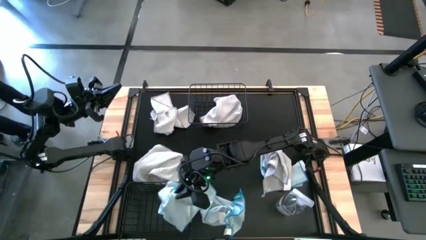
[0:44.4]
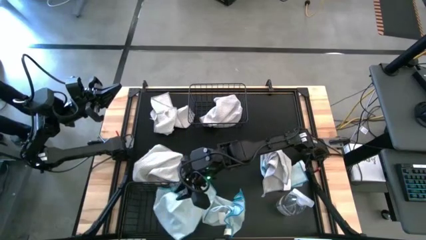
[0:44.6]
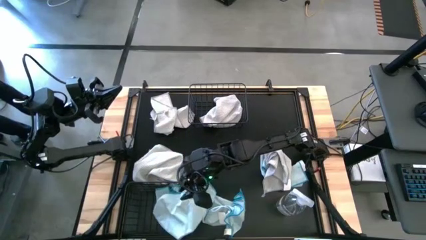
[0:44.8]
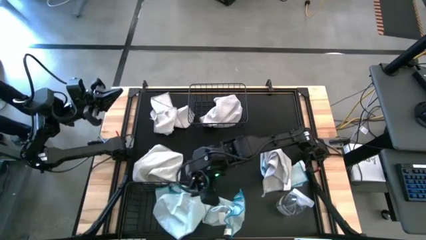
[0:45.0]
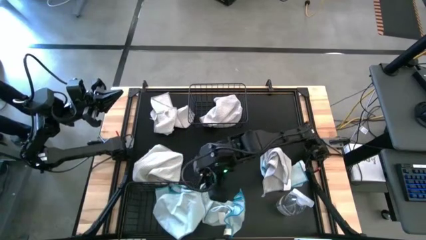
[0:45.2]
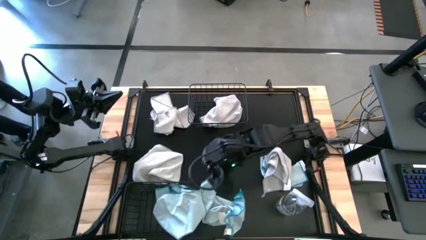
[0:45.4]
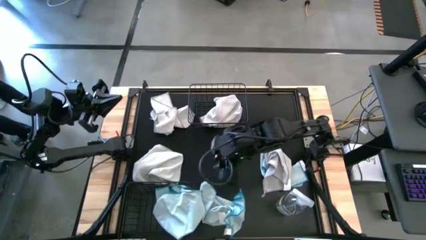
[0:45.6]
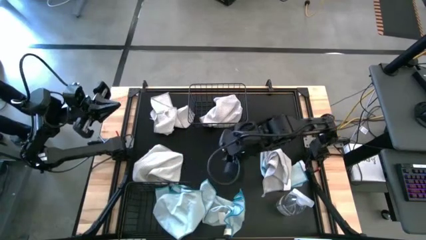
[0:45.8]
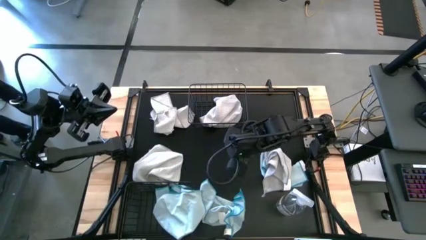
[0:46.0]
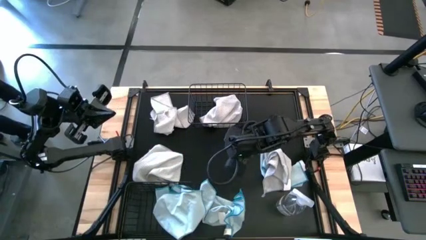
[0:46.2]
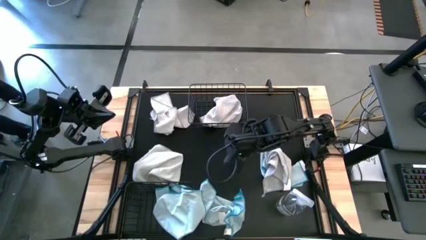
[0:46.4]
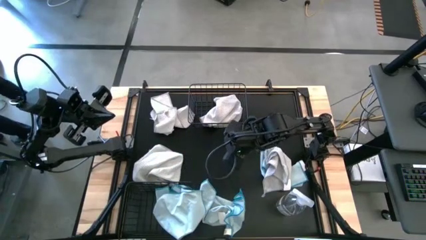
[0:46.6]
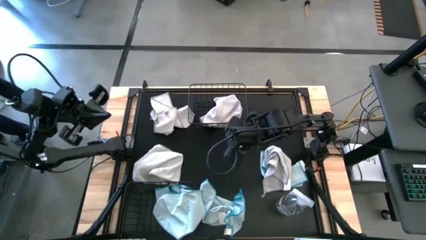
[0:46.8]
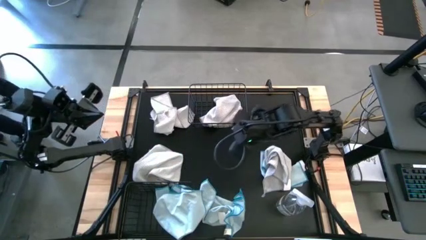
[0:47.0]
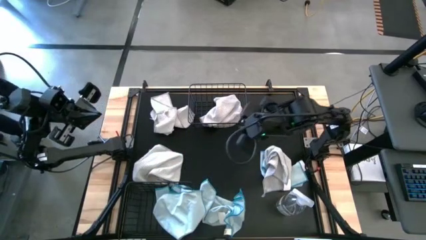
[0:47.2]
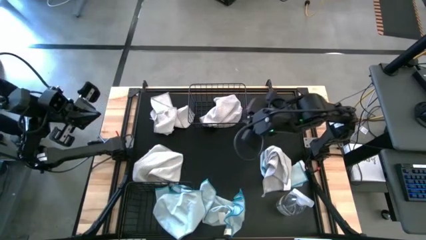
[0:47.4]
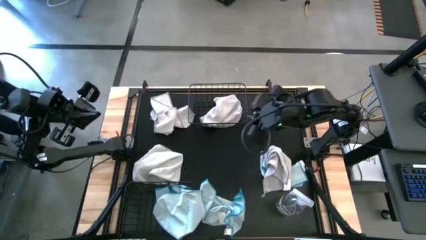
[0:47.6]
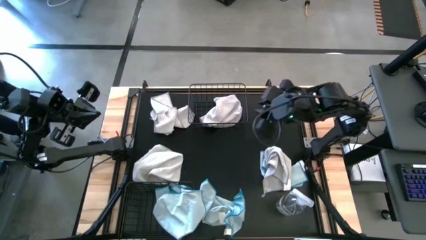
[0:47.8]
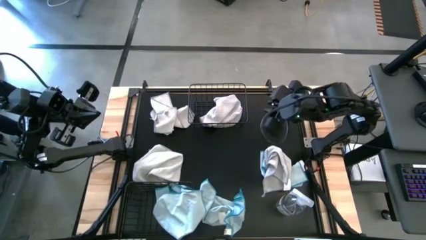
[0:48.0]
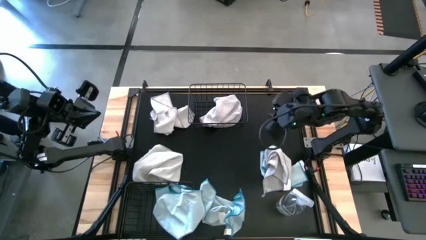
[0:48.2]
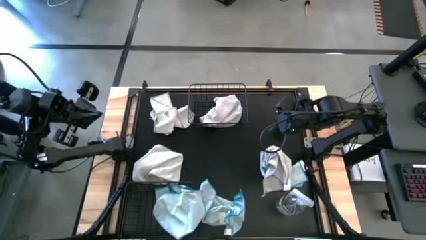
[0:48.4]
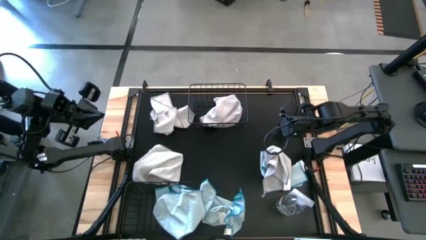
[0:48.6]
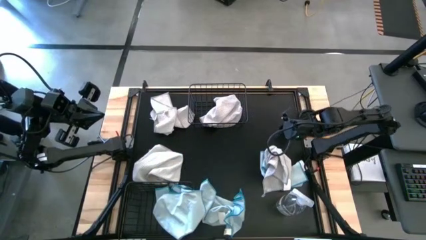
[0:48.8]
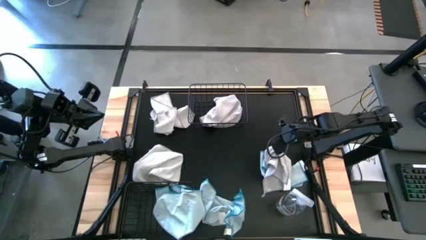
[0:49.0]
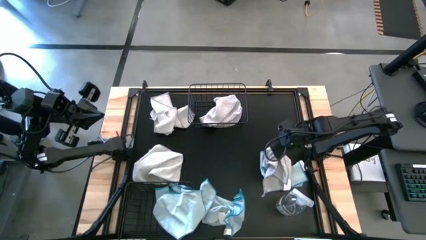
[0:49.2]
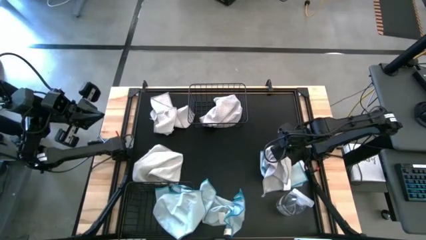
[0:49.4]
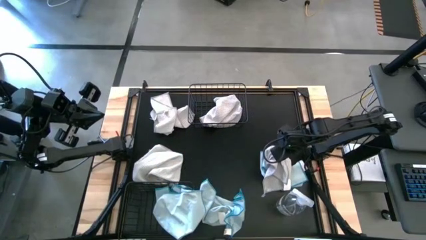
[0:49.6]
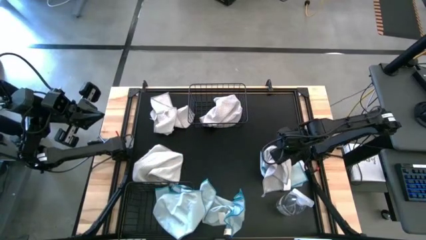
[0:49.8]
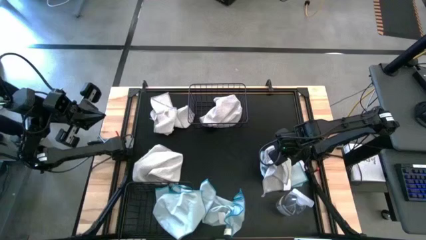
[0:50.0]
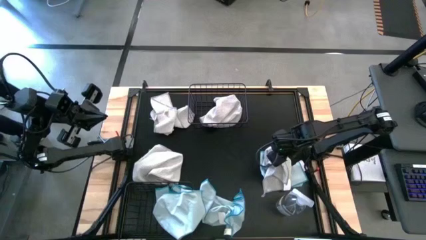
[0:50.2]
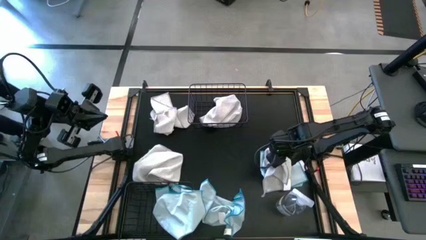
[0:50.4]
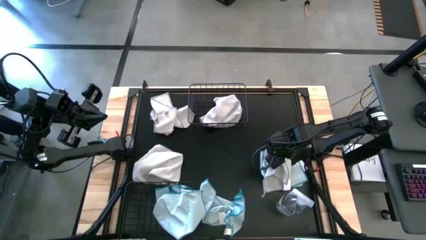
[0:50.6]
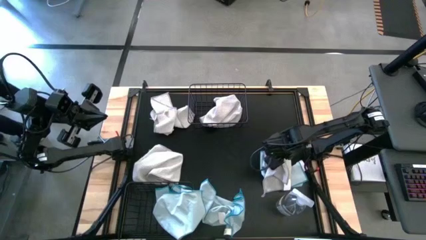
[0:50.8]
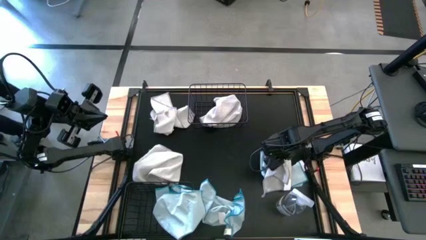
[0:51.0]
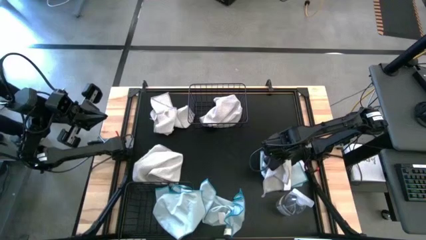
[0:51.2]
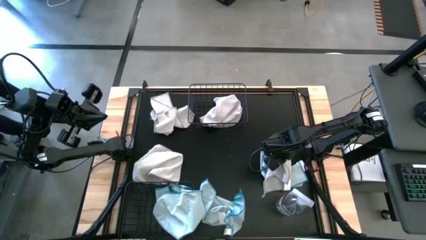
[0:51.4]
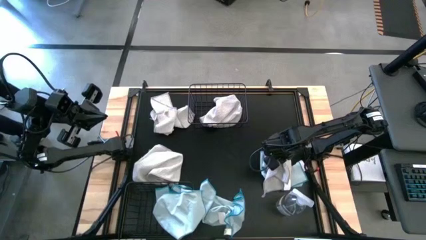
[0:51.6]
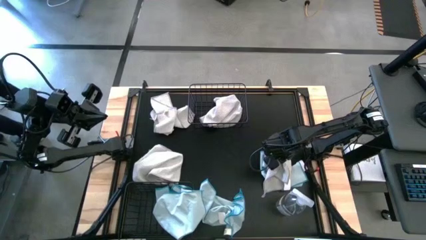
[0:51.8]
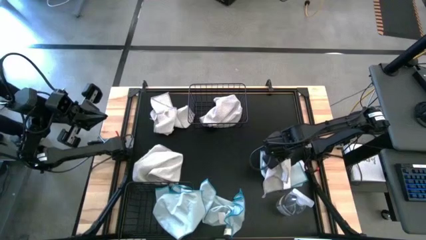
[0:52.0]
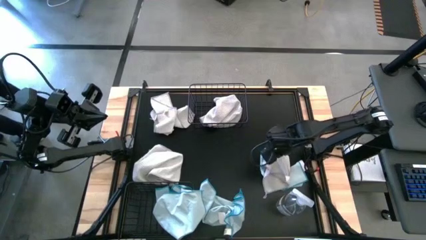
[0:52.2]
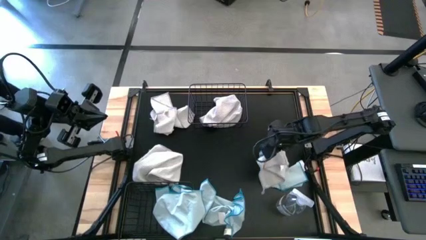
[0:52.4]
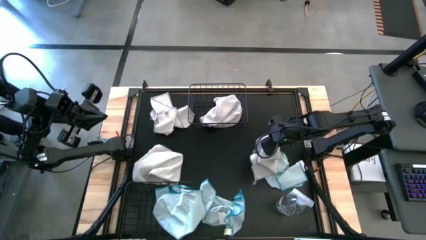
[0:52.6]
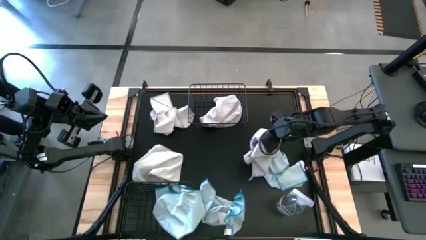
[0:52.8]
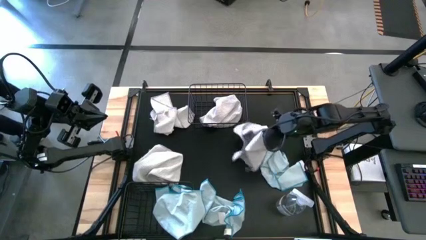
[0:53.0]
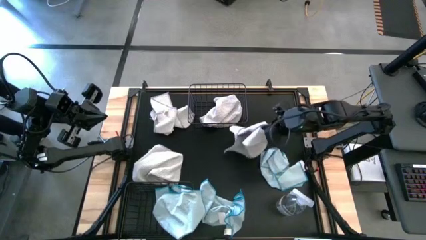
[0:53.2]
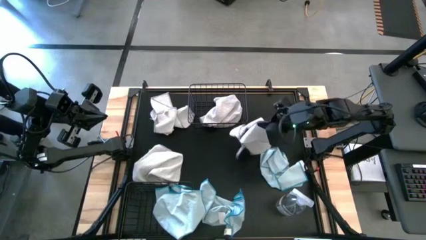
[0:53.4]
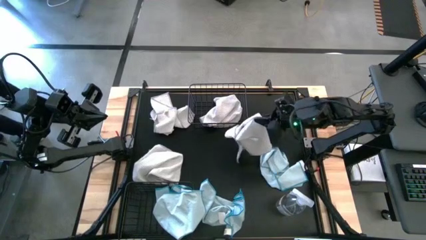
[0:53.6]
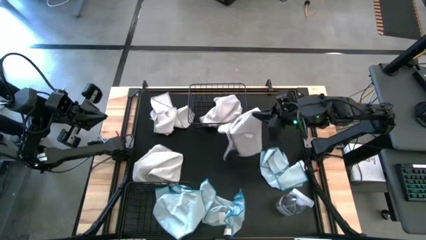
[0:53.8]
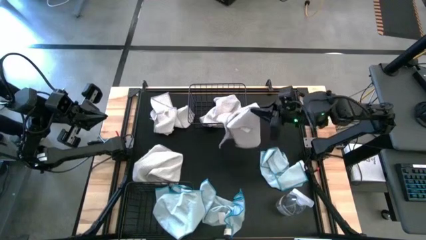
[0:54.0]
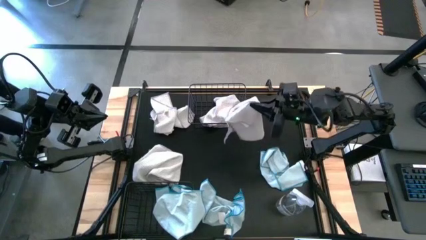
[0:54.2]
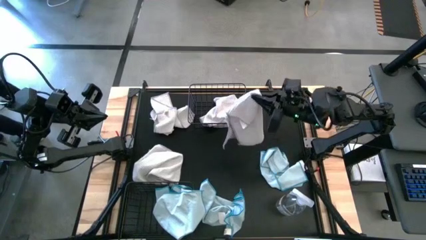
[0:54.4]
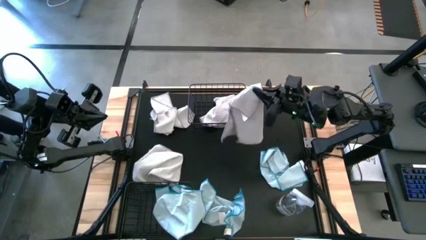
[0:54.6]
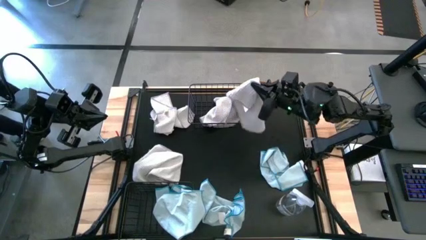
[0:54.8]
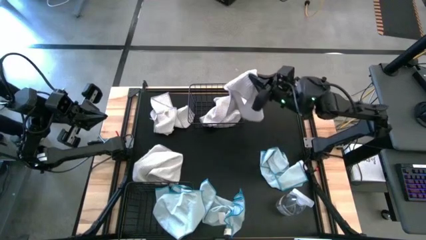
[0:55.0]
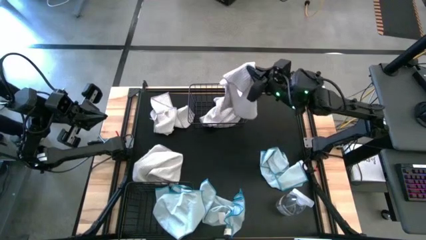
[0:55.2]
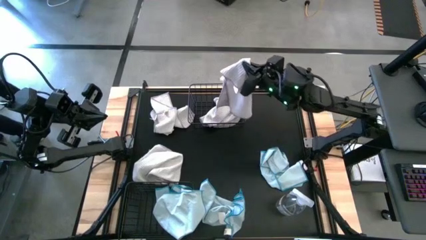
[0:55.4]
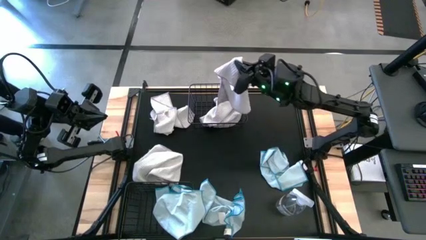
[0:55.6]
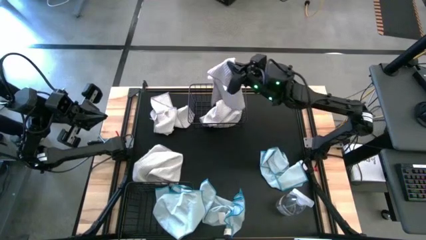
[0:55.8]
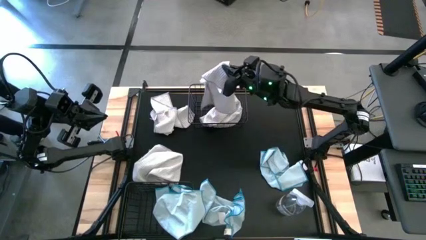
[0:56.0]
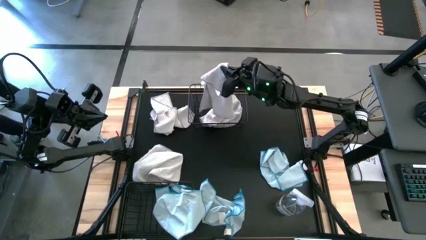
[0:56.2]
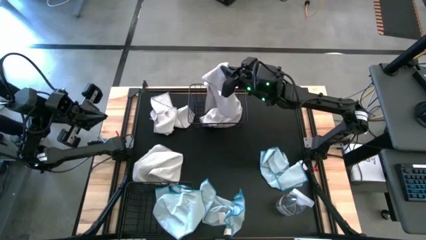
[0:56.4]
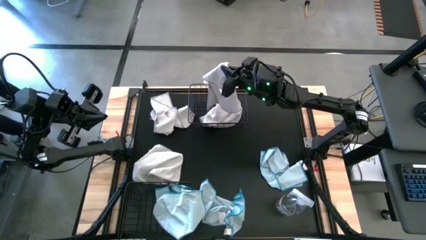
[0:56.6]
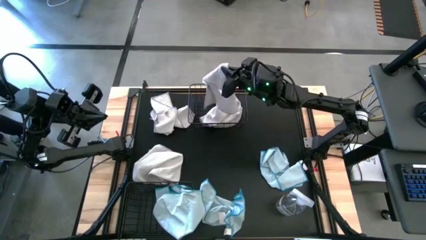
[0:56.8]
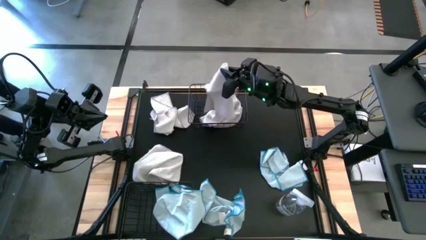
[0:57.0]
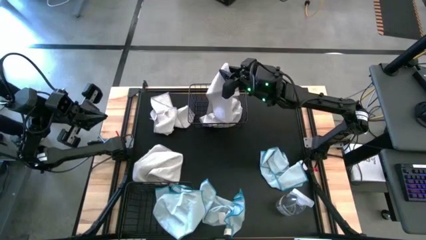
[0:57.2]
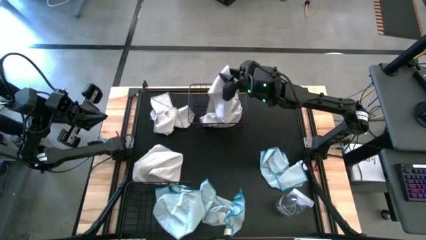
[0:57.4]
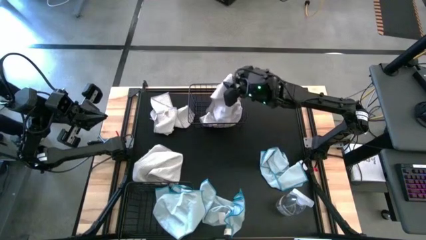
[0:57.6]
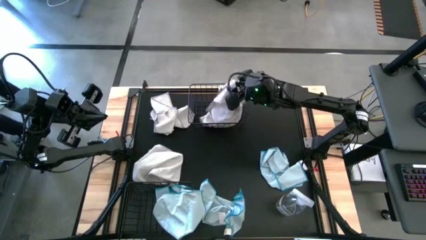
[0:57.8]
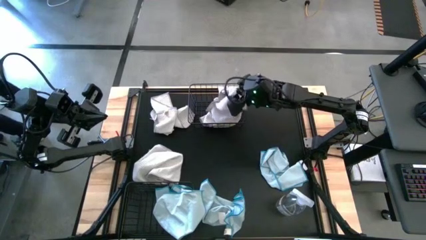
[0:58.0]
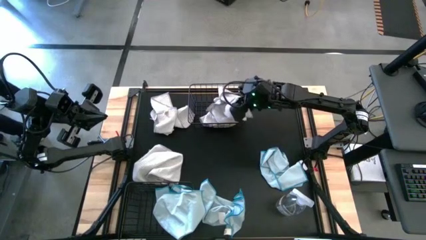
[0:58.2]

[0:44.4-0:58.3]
Task: Sort microfiber towel by color & place in baskets
Put the bottom right white microfiber cloth into the top wire basket
